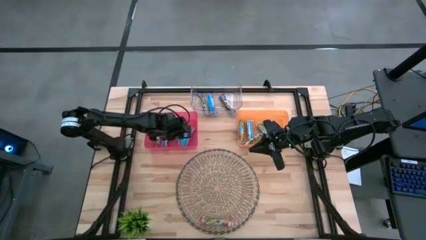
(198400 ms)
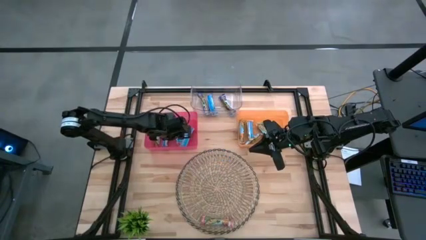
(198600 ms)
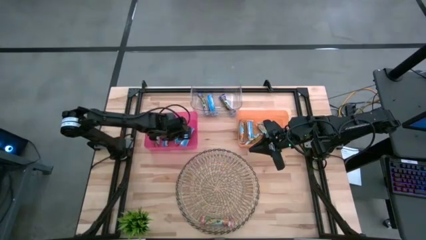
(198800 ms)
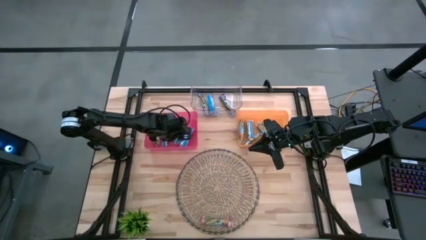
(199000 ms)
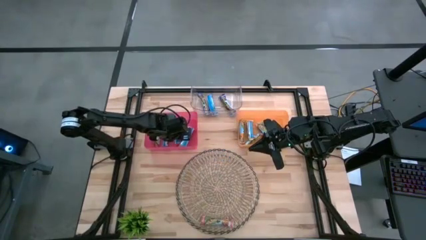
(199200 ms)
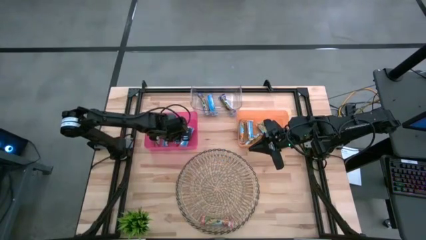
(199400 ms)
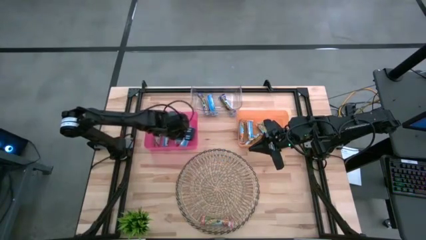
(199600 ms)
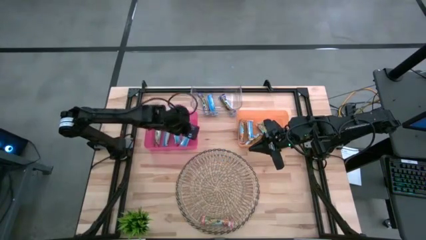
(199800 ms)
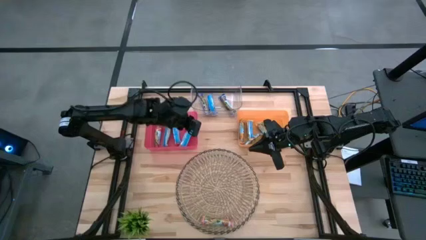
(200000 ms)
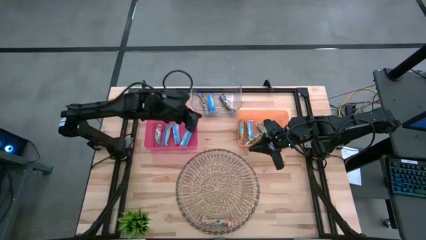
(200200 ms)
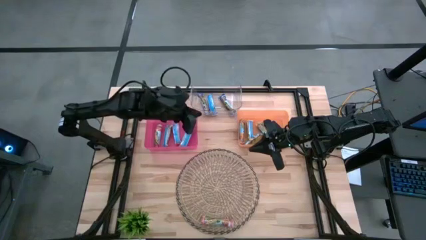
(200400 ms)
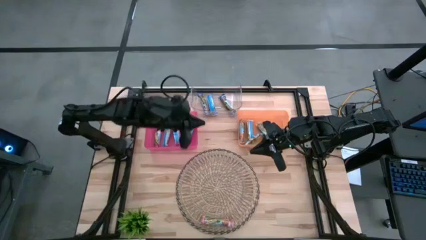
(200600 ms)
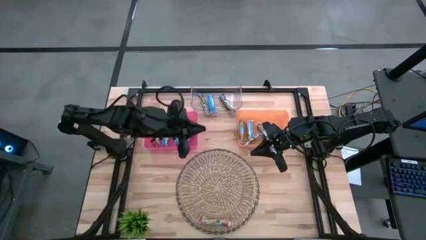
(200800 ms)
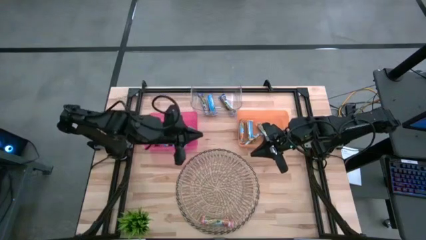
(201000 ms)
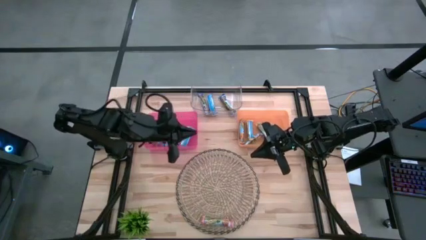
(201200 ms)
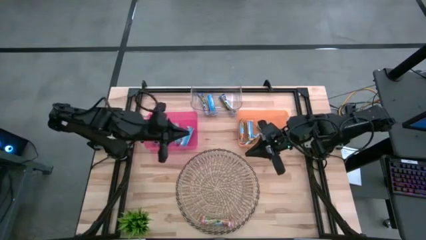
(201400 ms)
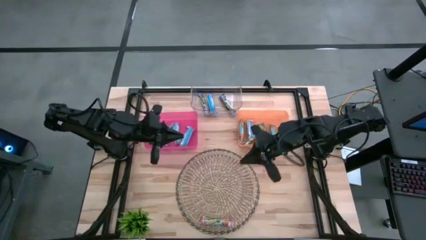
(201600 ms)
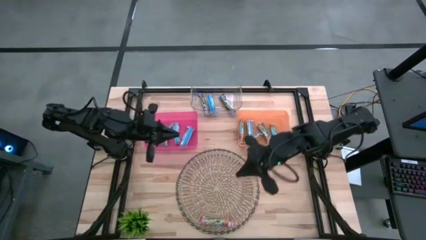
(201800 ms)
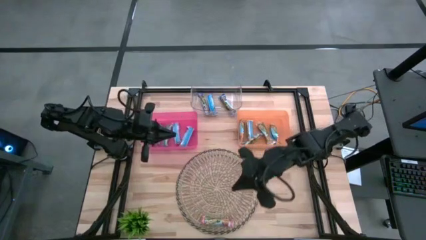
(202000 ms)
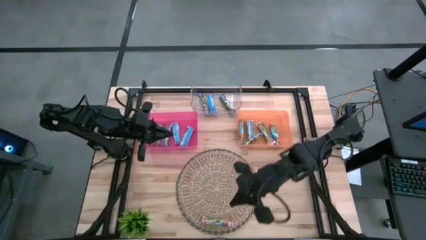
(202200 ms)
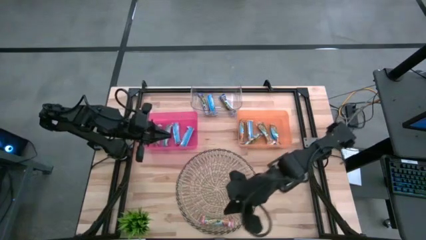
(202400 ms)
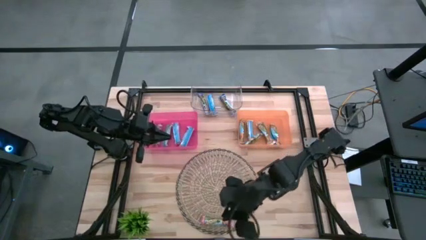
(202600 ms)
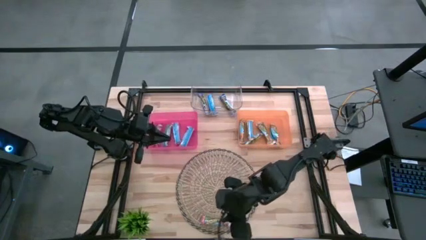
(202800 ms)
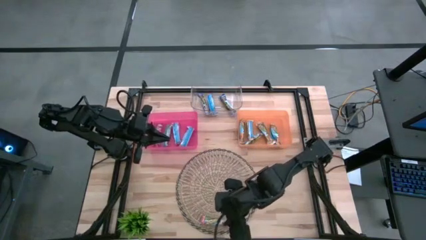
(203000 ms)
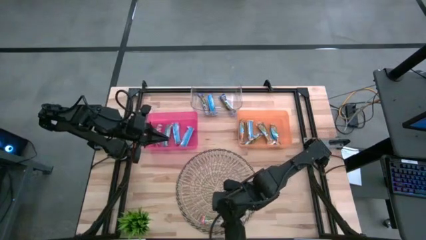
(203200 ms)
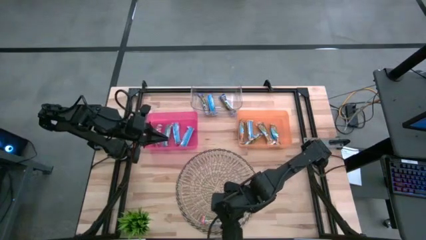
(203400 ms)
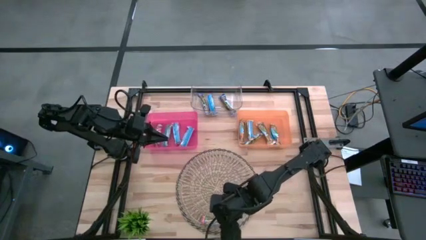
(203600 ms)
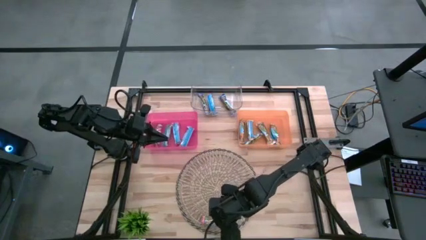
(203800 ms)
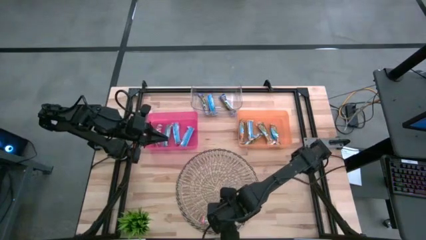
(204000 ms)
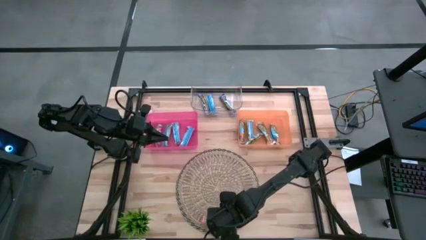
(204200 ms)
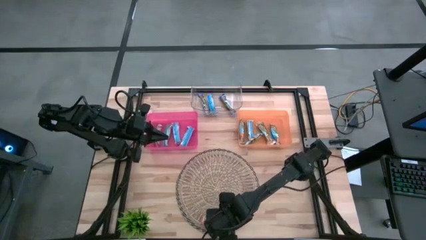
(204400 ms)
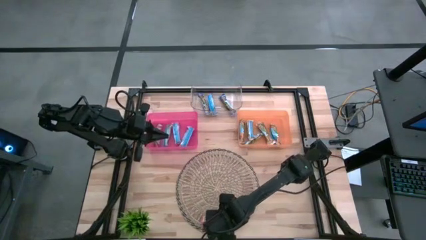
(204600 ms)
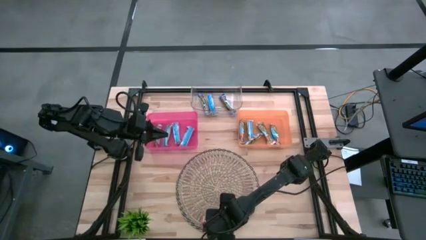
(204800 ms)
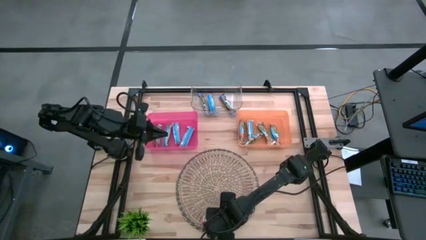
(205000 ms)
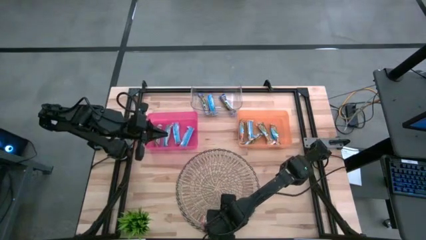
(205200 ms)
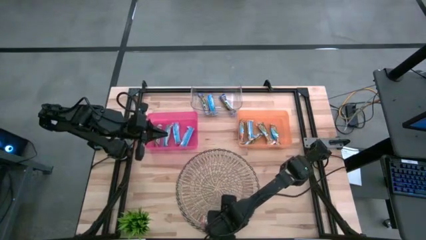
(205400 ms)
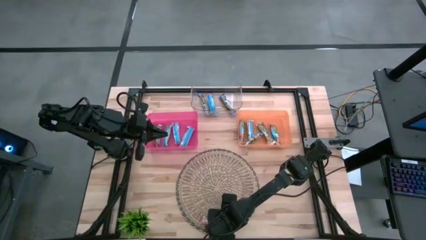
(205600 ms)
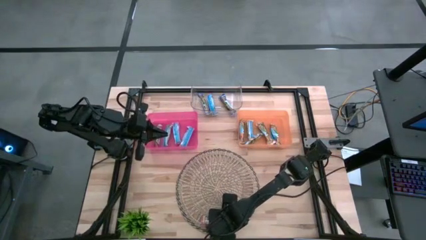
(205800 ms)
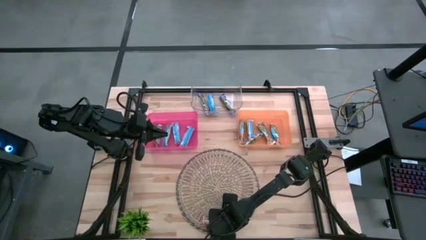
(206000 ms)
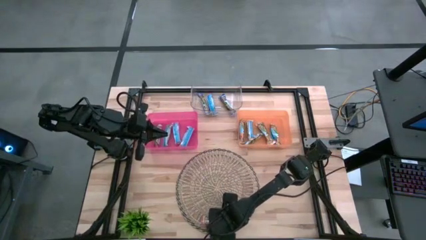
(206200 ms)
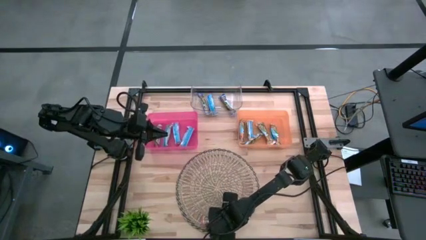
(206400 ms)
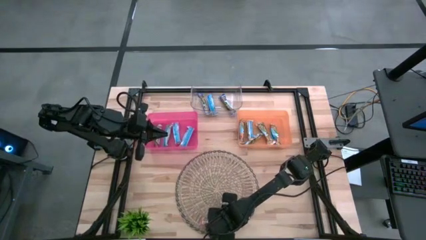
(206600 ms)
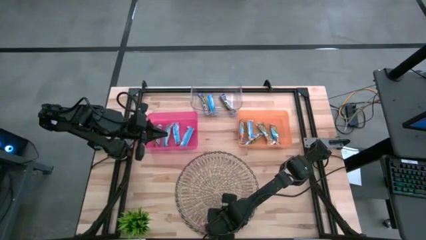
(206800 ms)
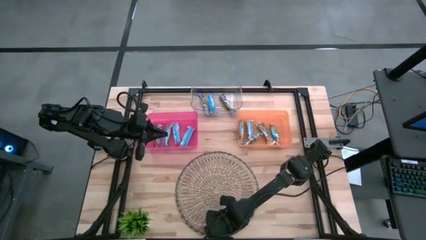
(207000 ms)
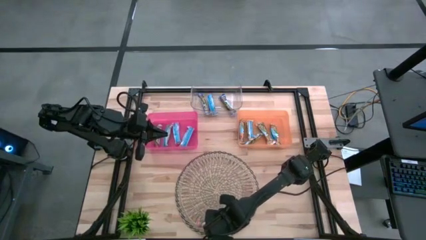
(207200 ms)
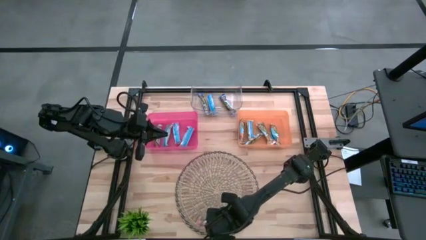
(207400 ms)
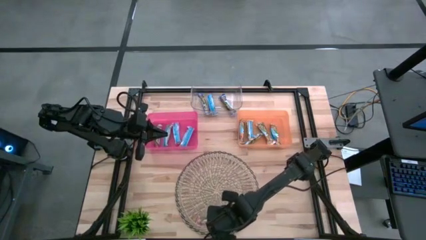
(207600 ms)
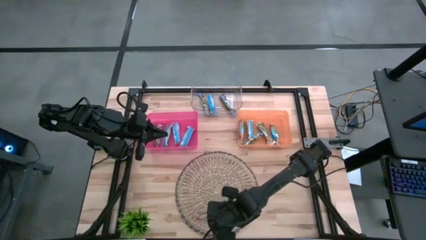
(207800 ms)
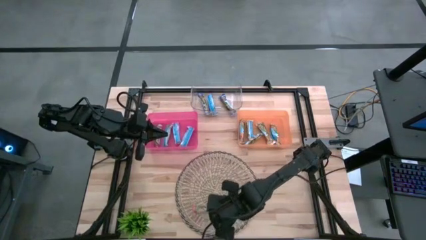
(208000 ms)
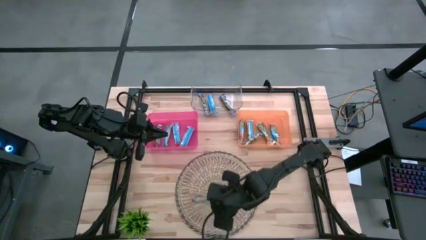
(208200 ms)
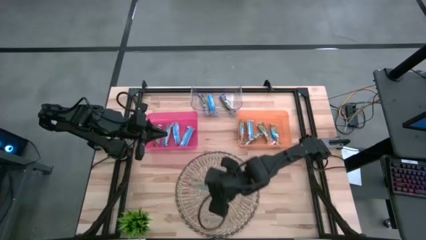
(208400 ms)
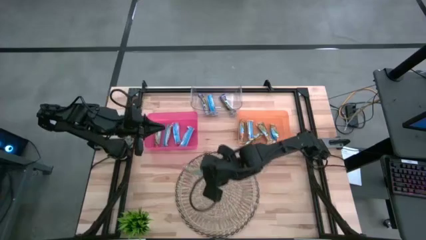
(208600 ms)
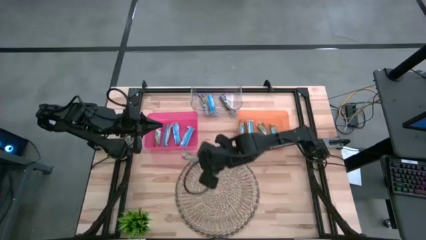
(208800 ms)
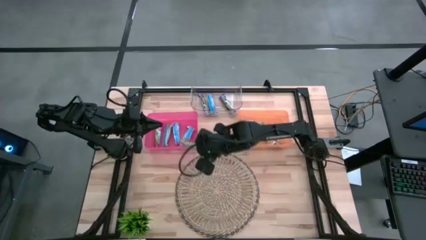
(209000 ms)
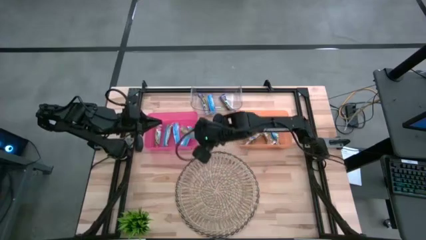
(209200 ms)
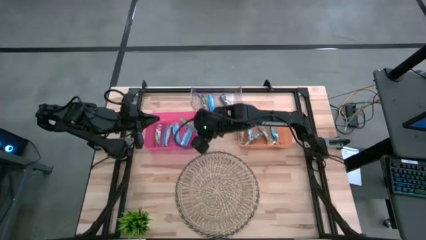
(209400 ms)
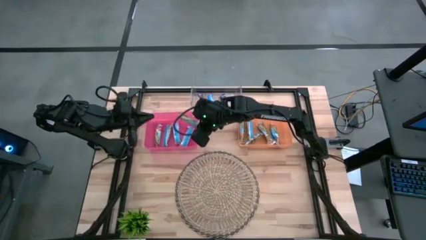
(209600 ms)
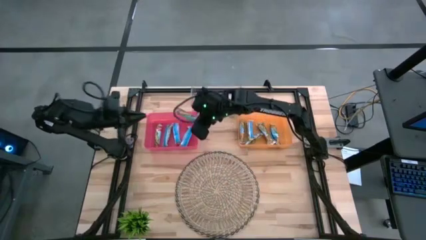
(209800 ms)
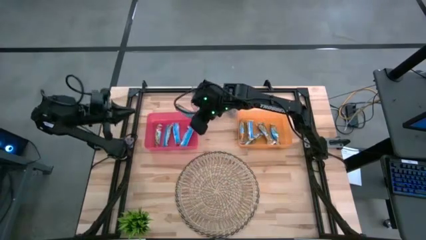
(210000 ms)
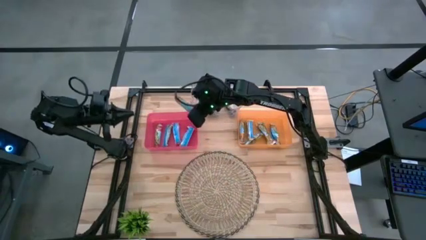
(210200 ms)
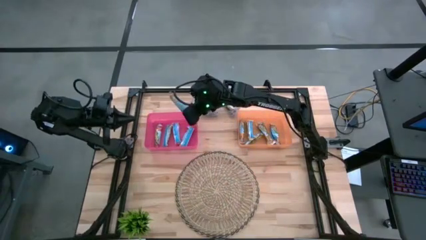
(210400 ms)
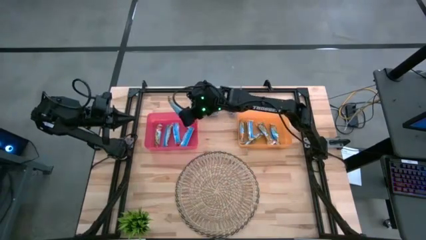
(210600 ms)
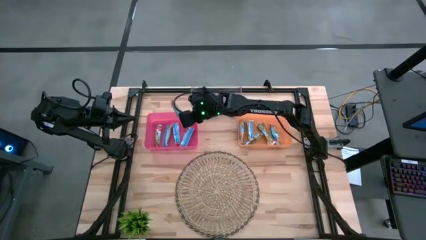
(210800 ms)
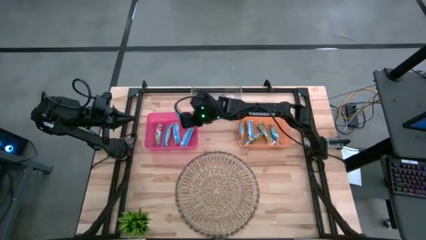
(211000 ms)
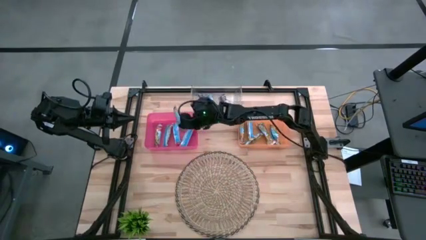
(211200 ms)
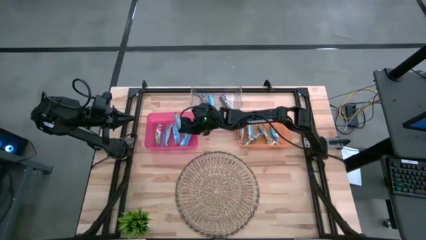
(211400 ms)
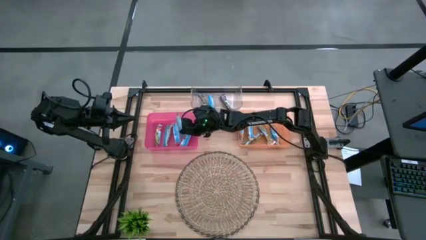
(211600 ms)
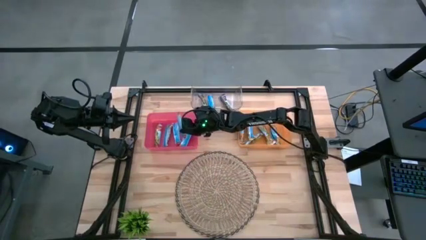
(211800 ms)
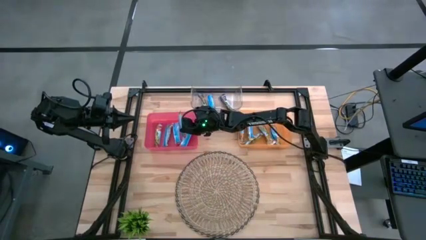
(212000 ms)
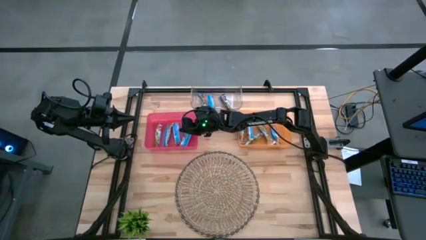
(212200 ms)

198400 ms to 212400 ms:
Task: Pick and place Granola Bars by type
Put the red granola bar into the pink bin

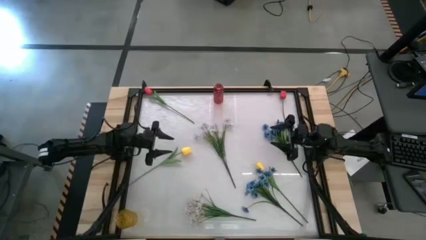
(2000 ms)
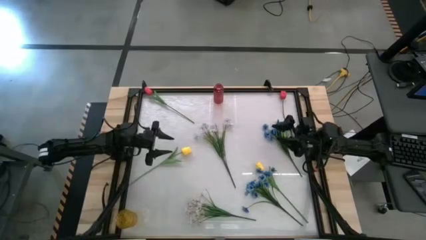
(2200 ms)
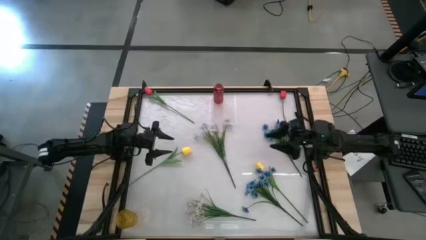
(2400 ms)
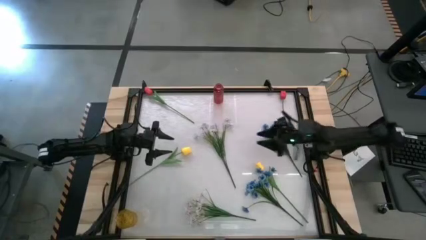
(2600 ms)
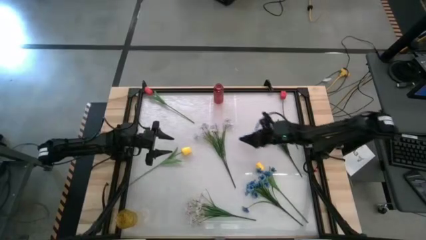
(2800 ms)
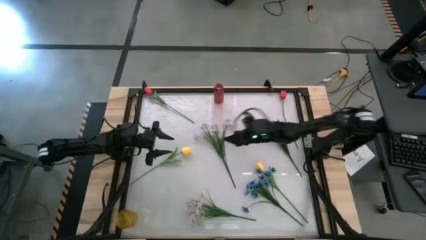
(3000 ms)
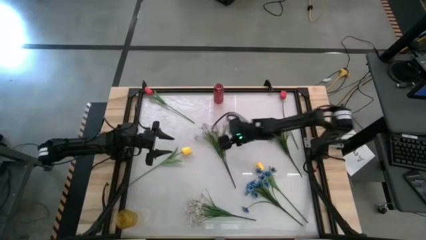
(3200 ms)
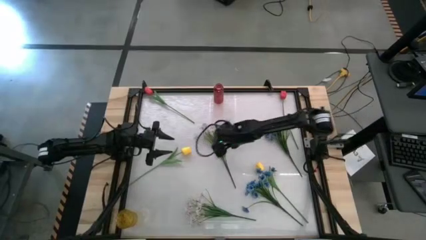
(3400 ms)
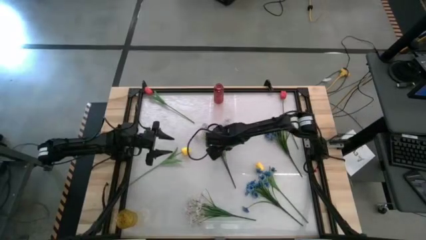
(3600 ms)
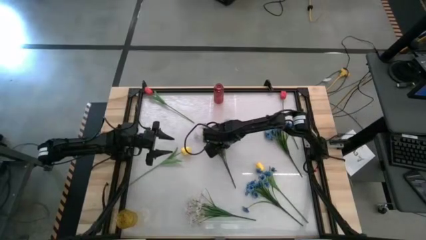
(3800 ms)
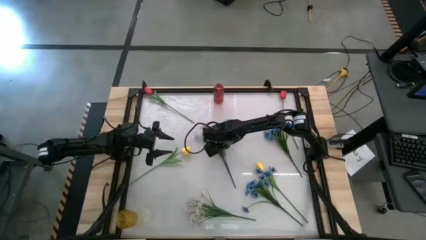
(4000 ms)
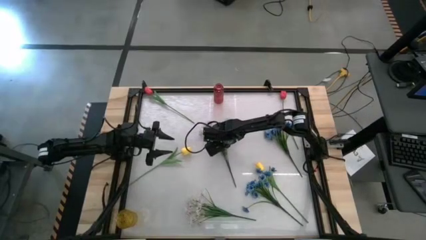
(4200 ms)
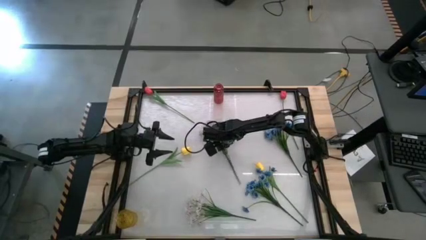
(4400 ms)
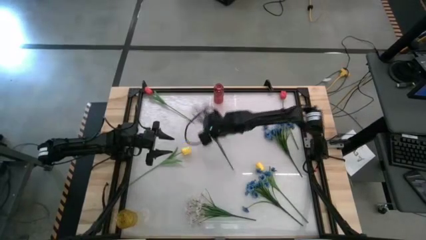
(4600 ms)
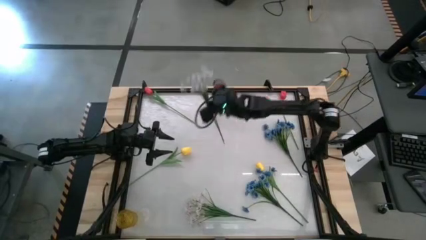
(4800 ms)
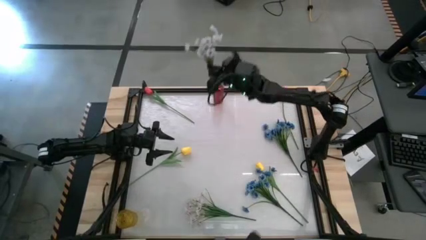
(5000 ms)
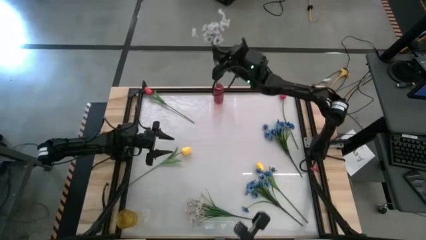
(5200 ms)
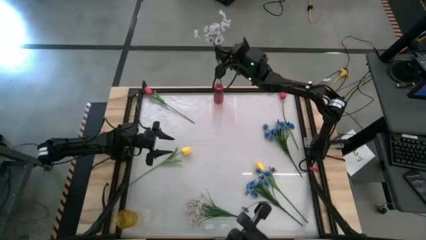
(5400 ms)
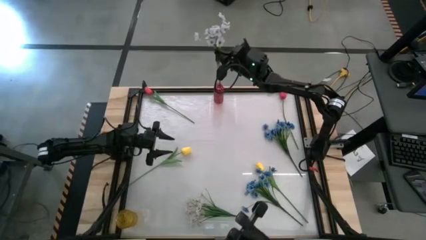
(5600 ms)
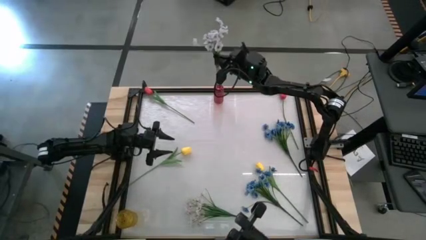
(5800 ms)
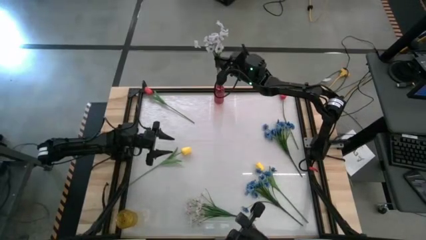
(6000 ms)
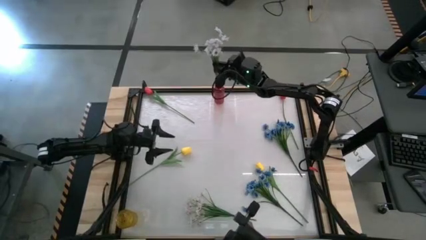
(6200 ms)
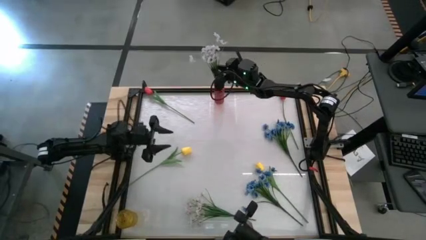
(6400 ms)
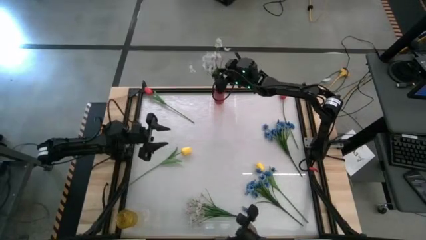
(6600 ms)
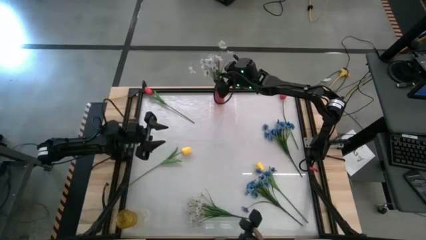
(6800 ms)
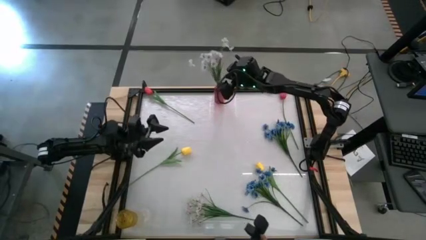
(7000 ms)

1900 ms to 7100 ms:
Task: Sort flowers into vase by color
Put the top white flowers into the red vase
